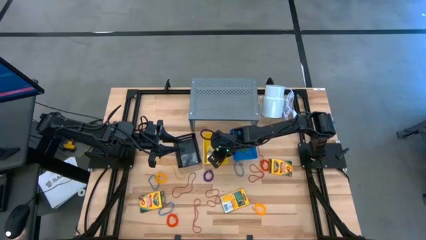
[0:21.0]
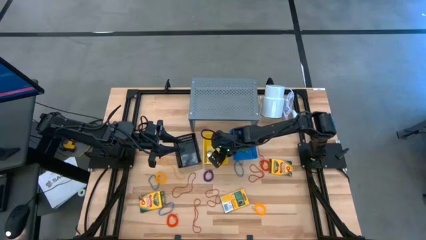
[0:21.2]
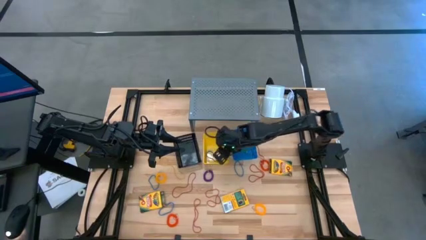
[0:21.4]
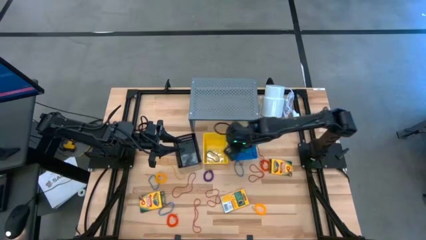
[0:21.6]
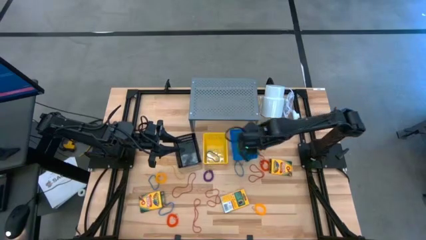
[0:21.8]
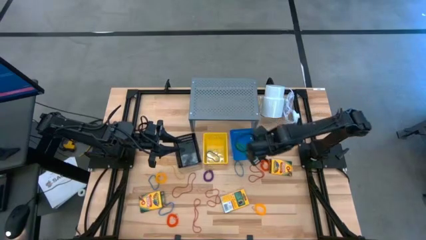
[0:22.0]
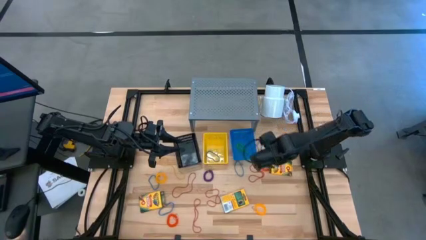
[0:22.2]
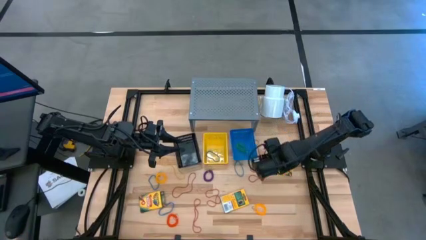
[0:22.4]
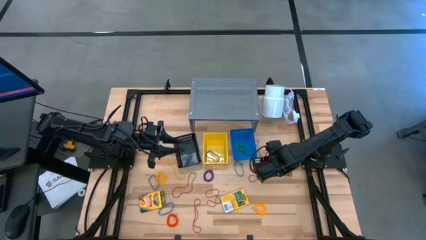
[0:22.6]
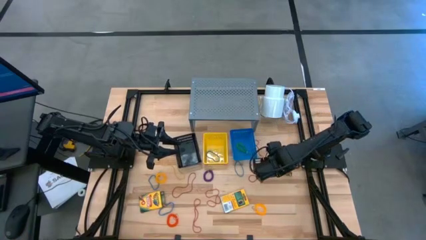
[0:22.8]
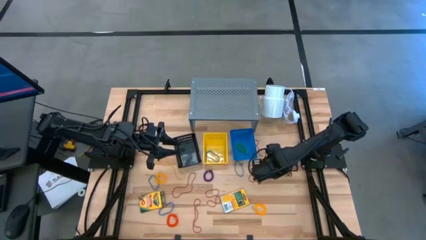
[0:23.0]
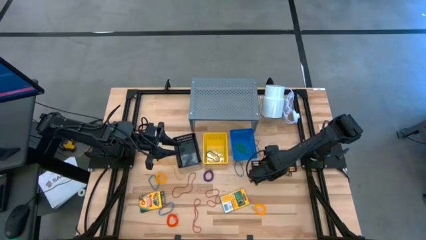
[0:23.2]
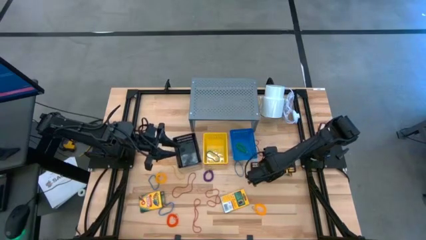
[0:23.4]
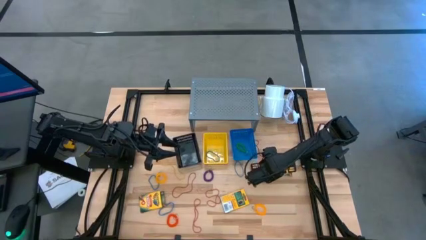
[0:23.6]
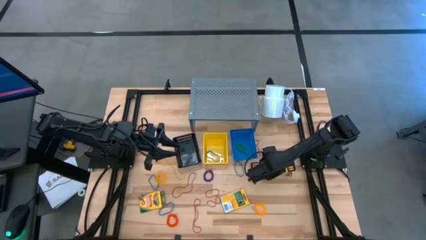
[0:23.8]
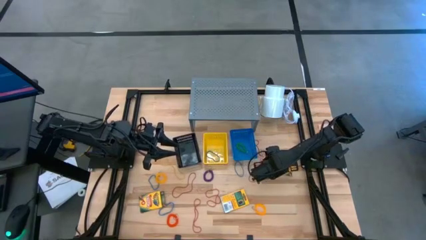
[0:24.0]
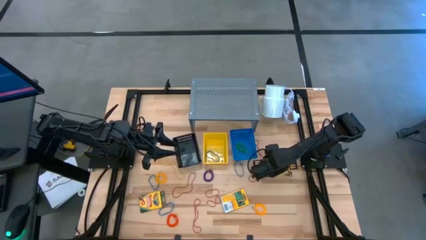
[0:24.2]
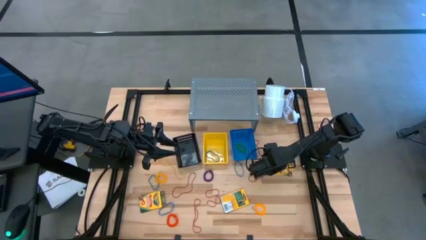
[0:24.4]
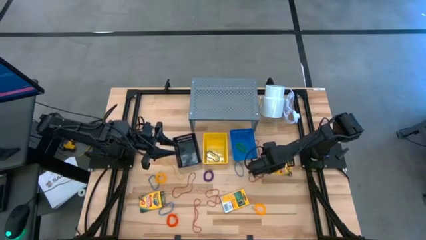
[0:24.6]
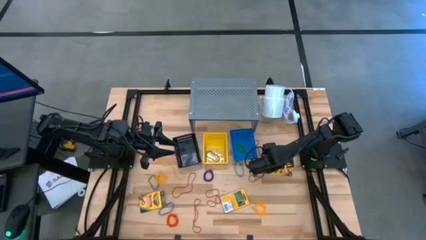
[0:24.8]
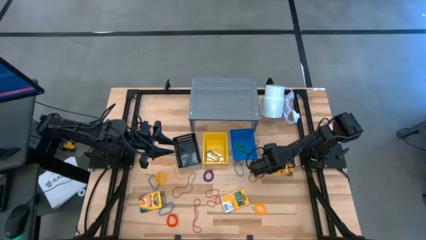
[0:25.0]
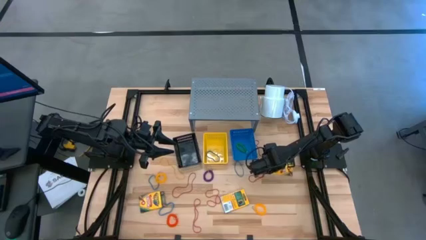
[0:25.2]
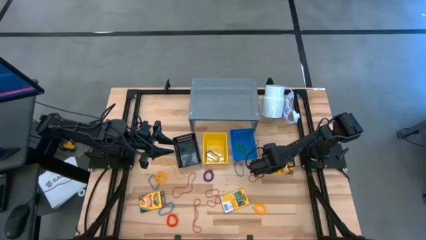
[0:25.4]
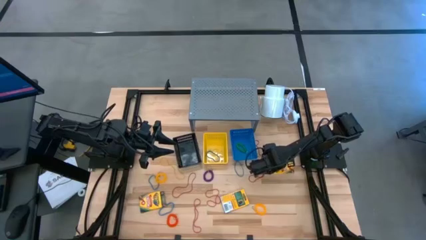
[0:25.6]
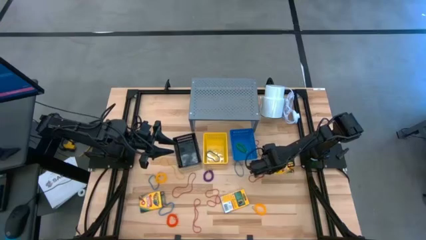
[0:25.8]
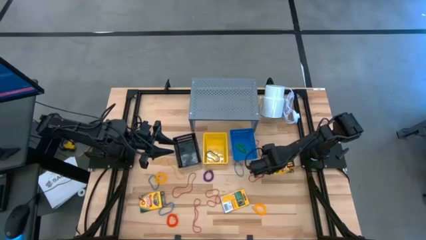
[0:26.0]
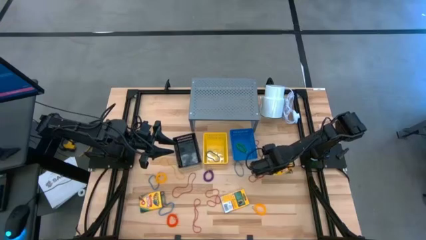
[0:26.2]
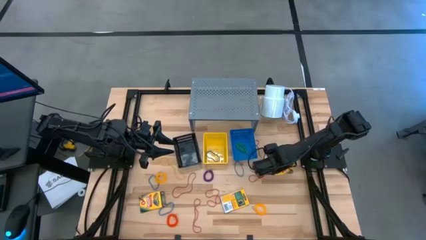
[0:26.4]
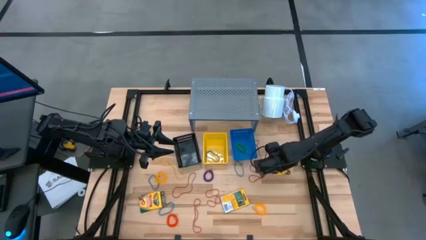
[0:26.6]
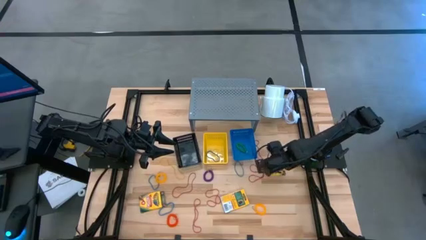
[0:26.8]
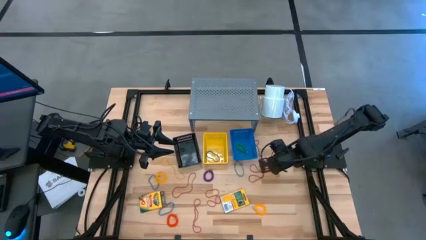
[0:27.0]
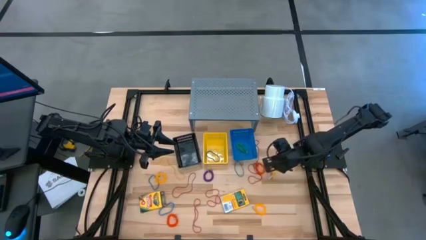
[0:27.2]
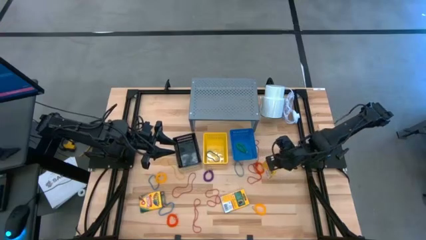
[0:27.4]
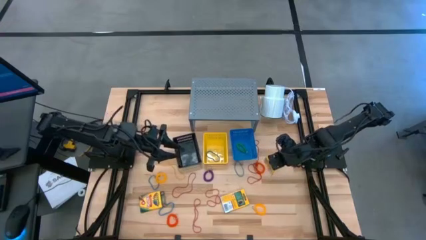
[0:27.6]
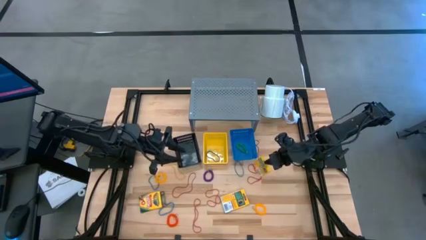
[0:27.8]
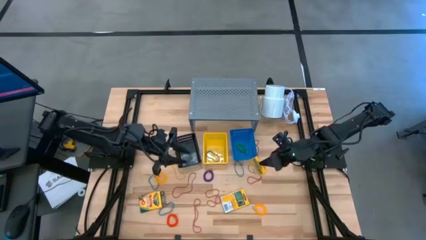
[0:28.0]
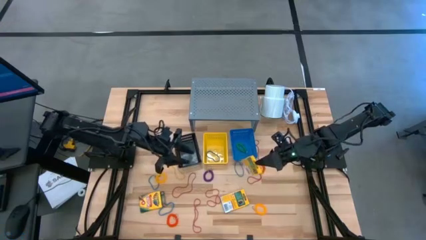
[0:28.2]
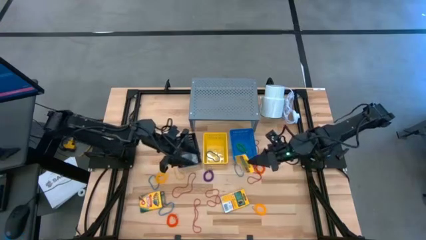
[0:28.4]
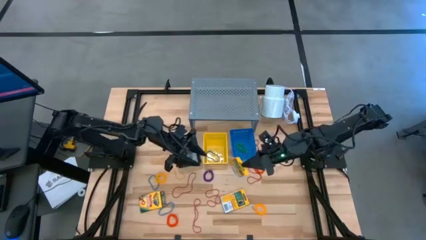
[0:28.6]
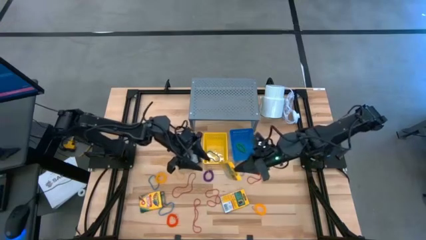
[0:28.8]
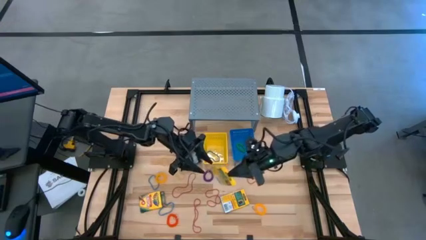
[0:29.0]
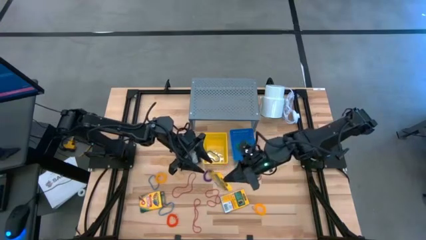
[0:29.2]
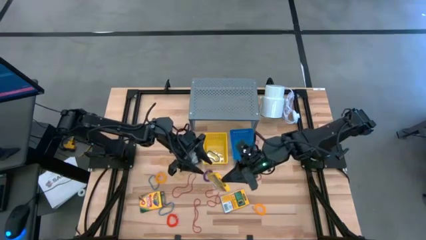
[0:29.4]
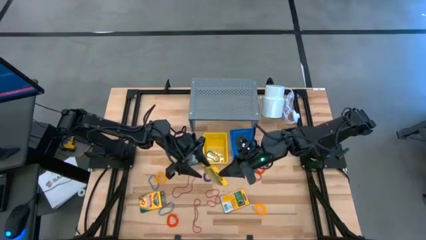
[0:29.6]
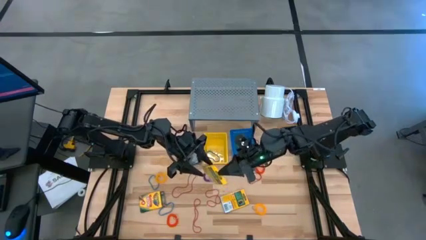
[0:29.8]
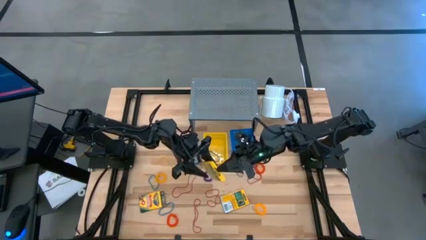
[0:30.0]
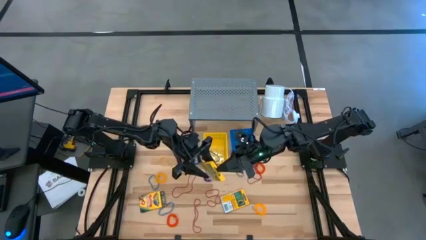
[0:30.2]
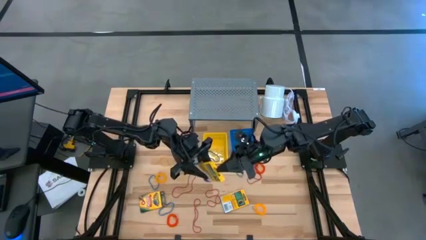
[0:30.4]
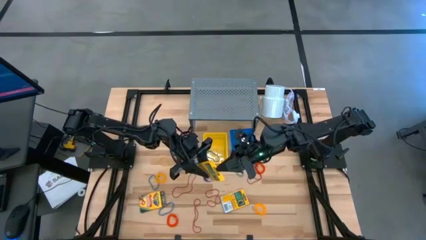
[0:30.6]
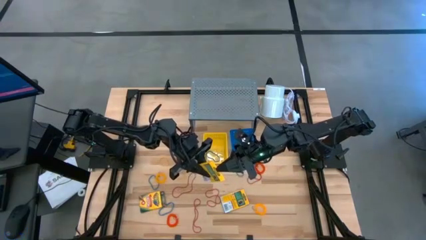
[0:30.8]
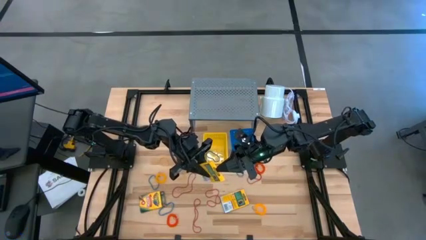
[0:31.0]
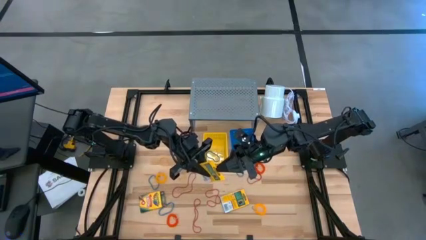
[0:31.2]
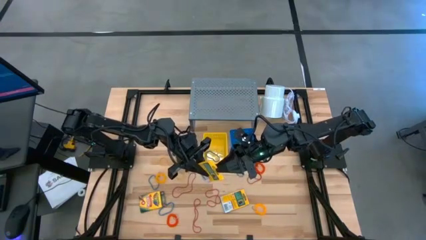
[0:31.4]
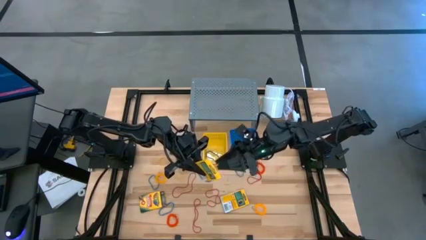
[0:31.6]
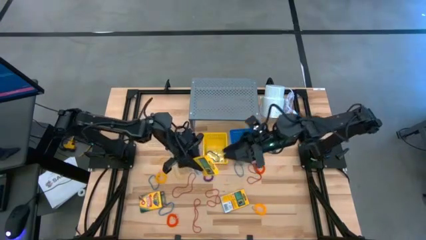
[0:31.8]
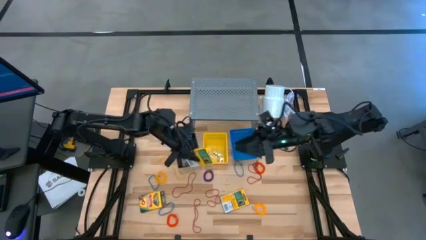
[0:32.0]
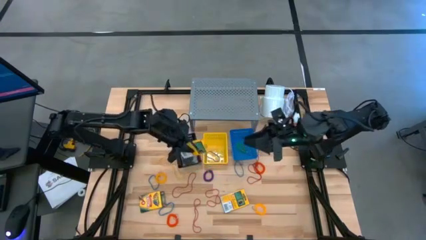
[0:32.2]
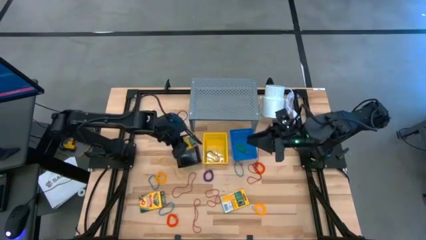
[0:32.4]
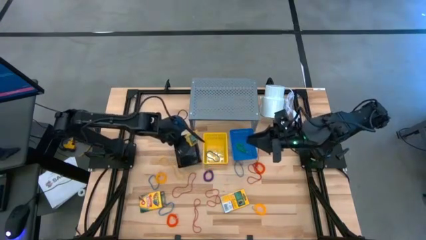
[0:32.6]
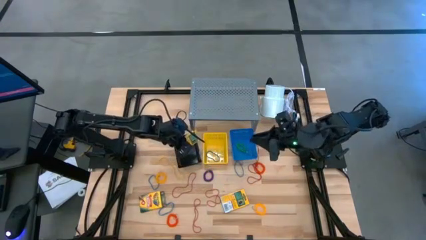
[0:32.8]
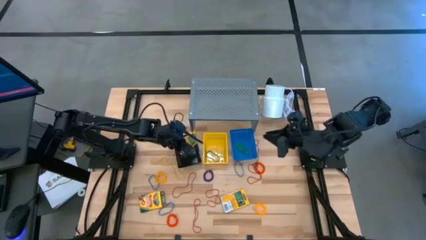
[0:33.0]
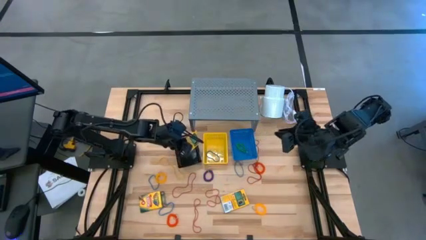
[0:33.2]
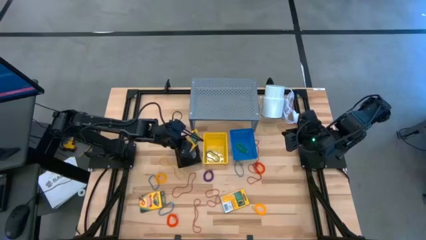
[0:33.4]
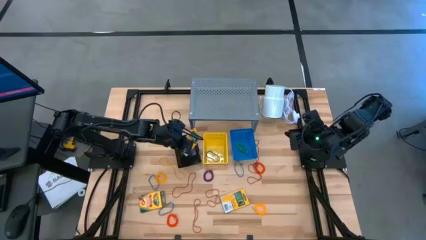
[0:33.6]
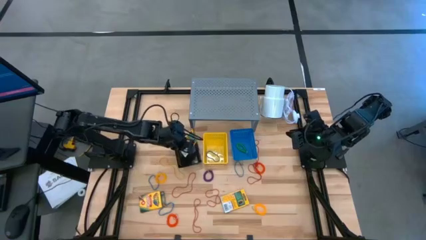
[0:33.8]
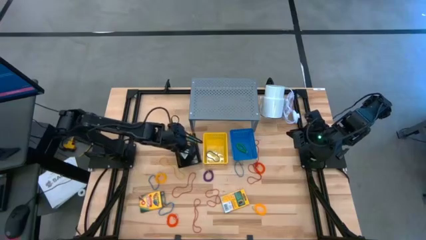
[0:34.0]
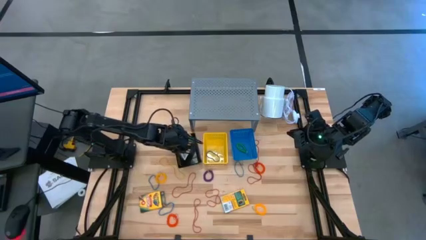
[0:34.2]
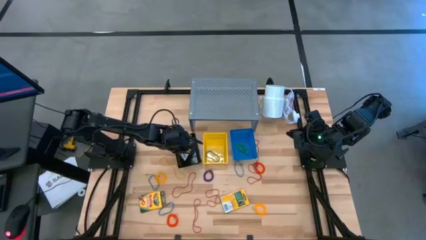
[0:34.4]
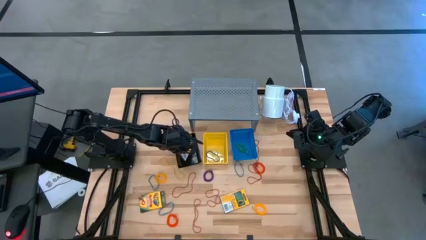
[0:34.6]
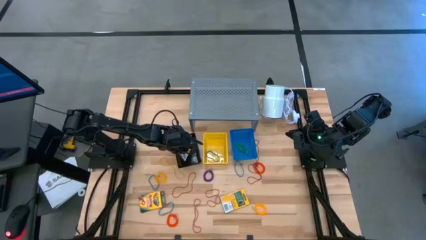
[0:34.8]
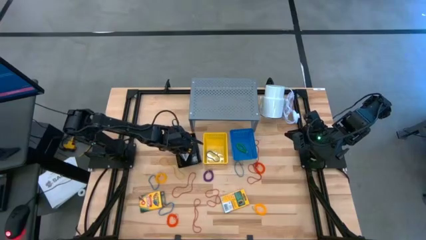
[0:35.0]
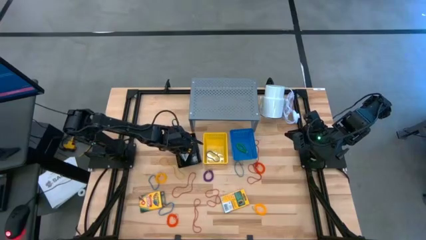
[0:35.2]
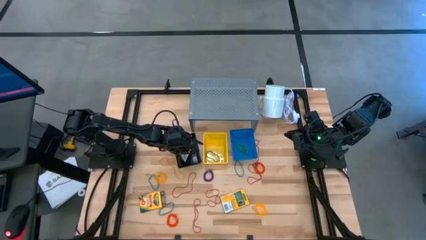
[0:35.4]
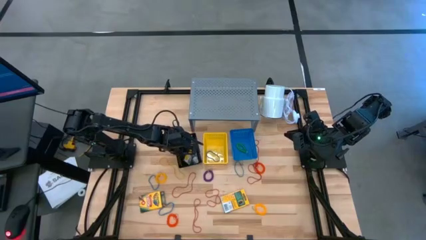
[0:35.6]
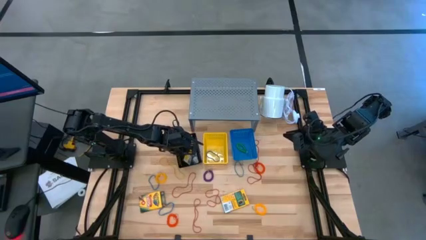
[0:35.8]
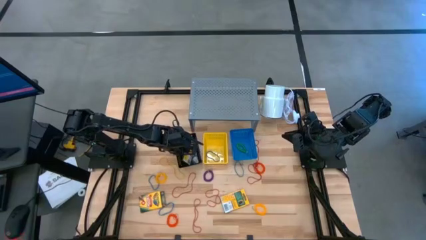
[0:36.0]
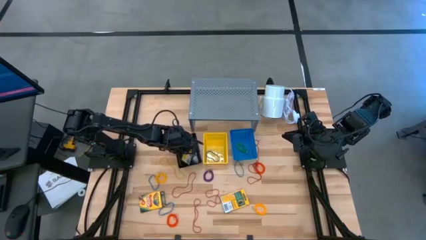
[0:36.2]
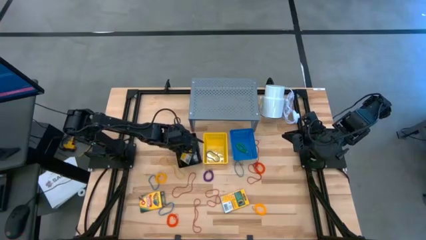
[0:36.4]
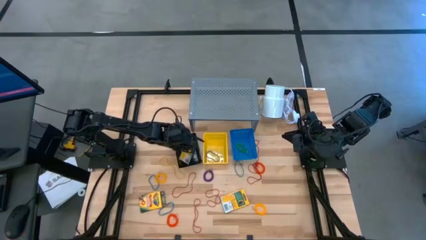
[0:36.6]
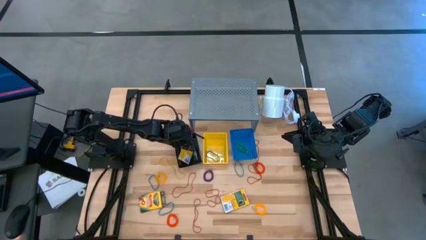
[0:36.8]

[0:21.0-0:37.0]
Task: Pick & Place Office Desk Supplies
Put the crayon box into the black basket
